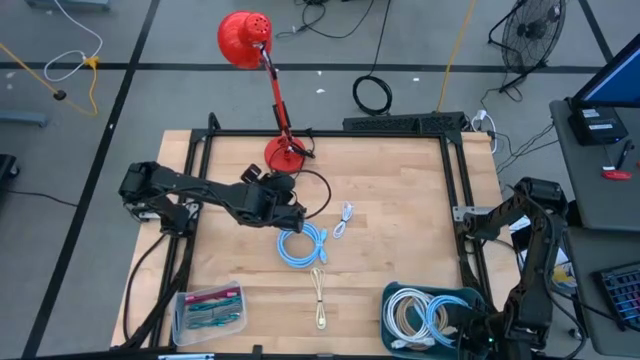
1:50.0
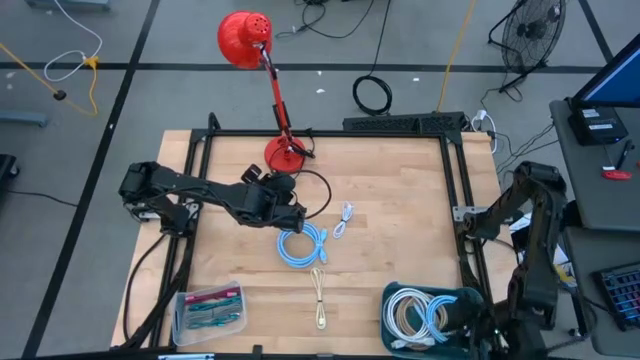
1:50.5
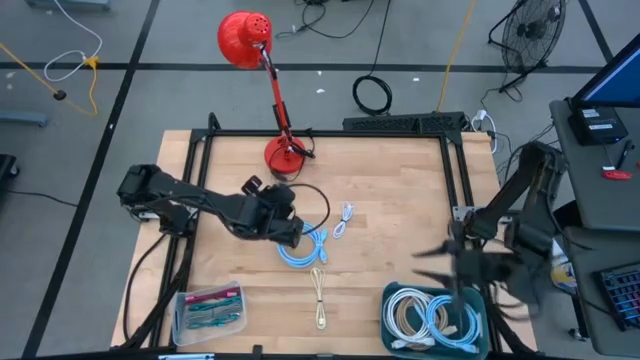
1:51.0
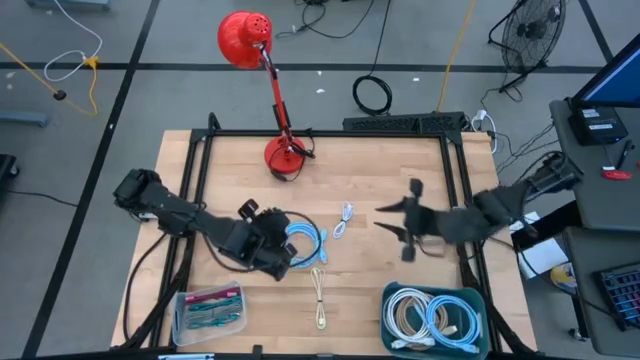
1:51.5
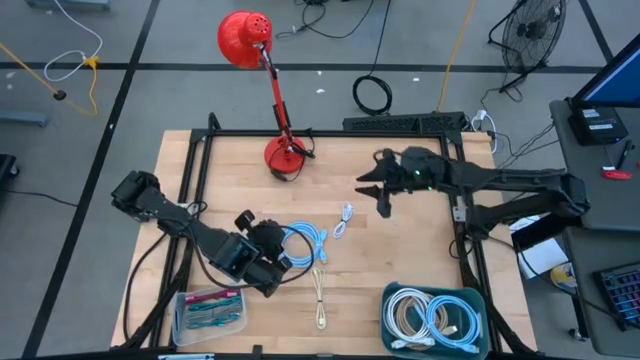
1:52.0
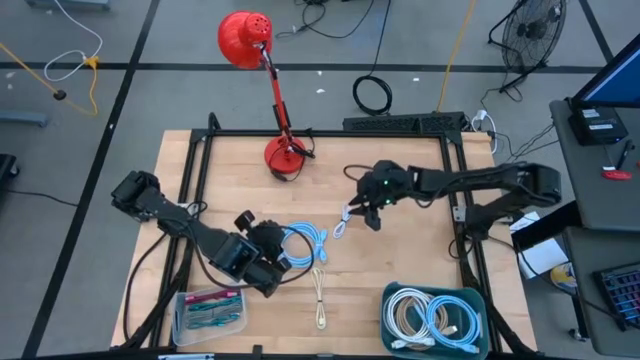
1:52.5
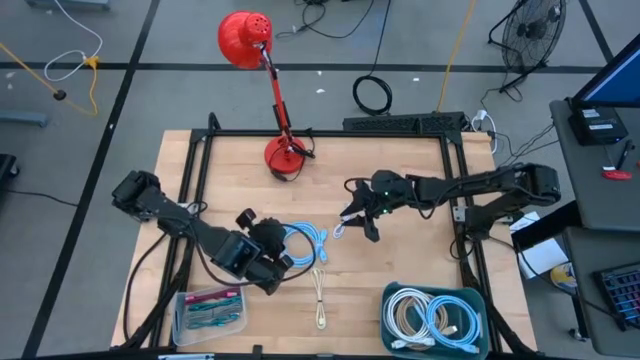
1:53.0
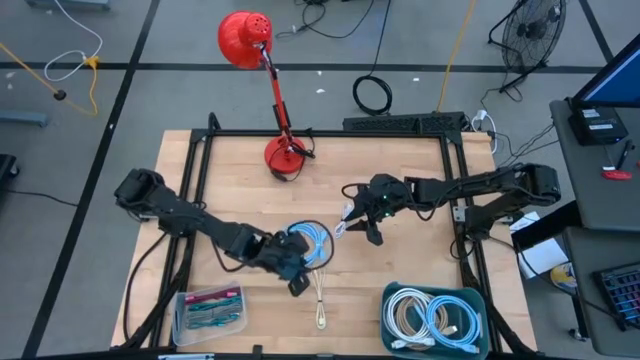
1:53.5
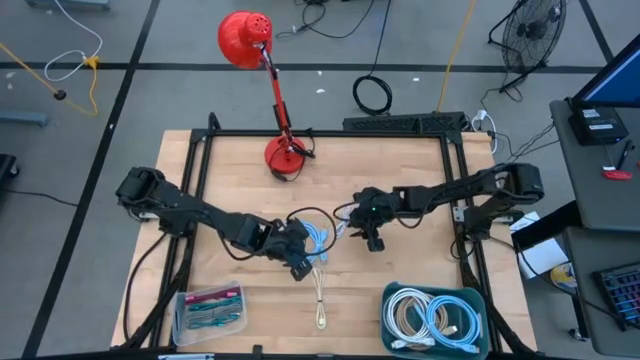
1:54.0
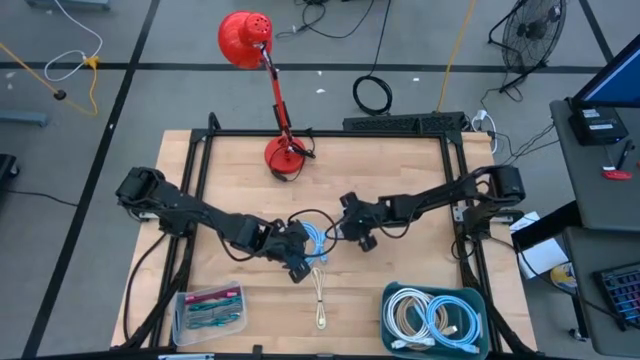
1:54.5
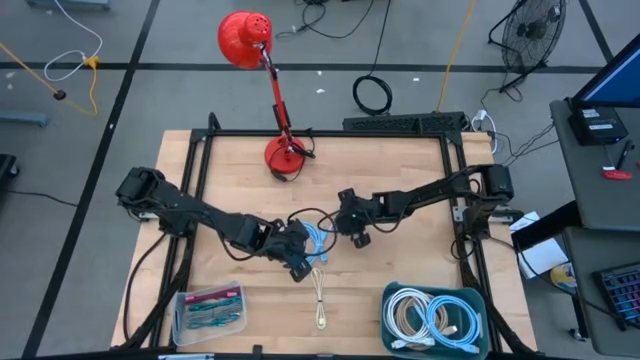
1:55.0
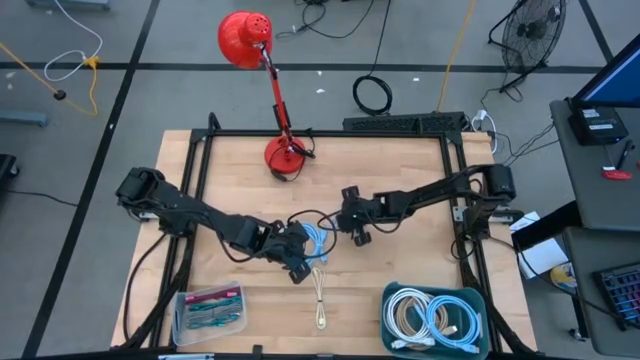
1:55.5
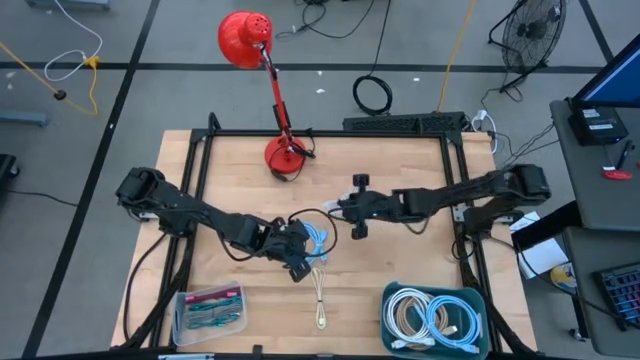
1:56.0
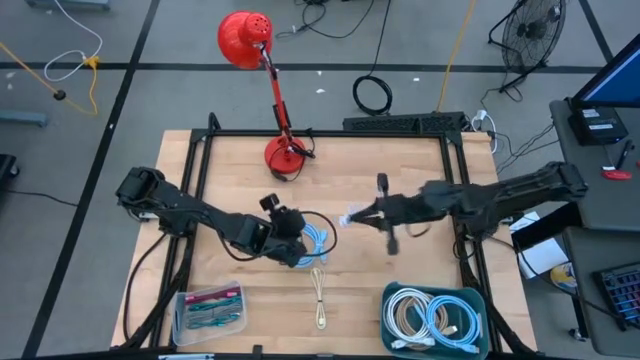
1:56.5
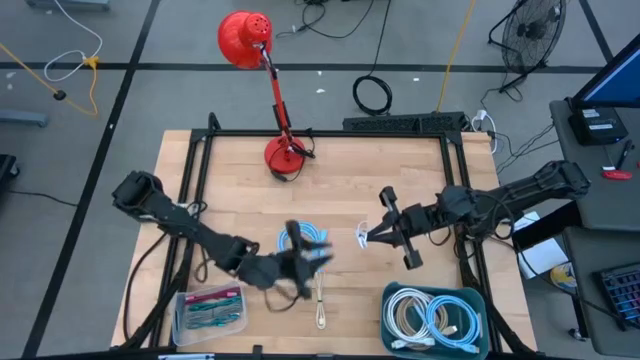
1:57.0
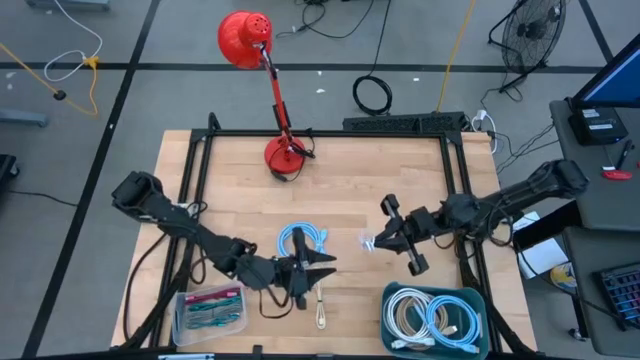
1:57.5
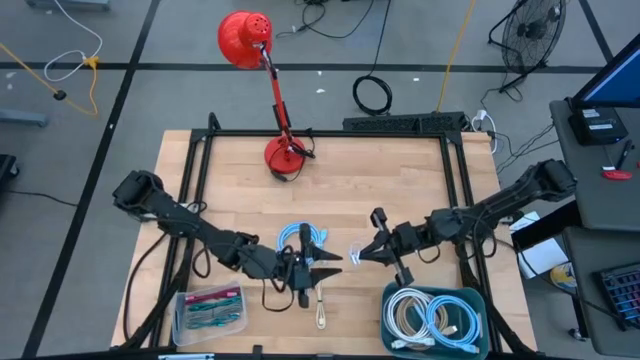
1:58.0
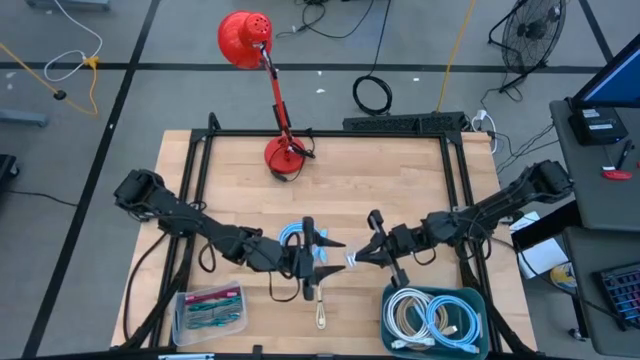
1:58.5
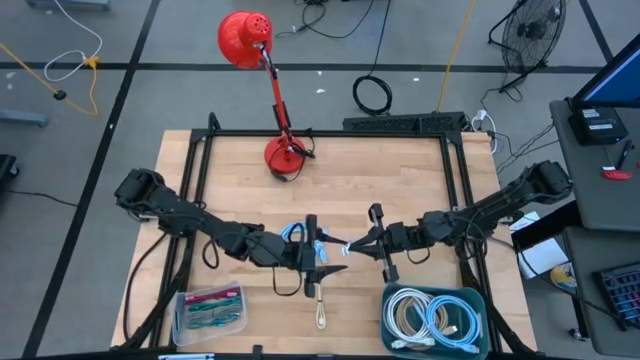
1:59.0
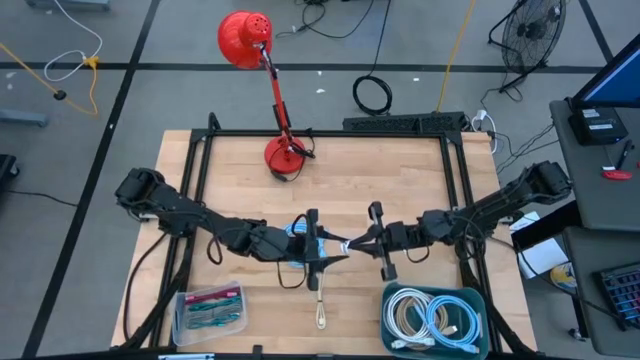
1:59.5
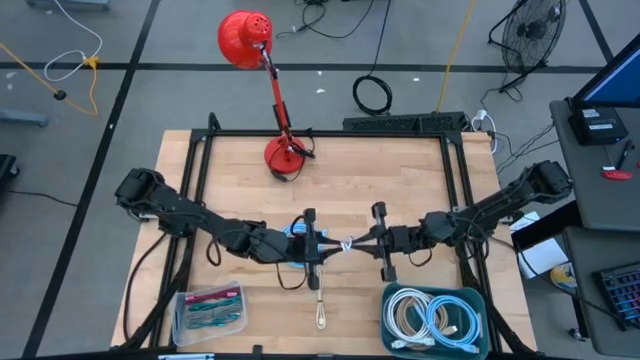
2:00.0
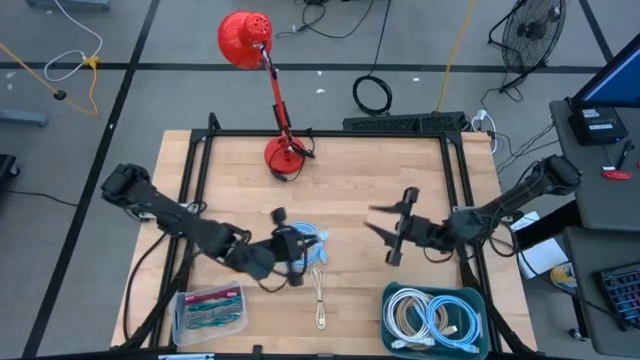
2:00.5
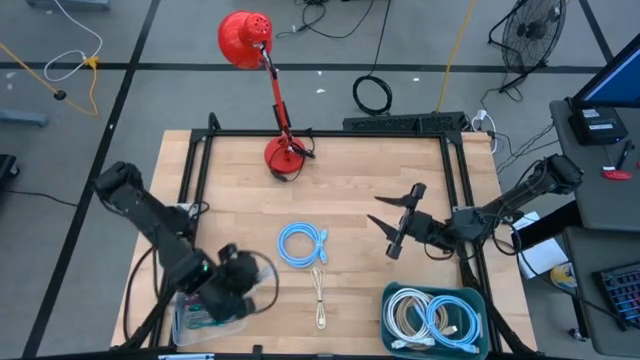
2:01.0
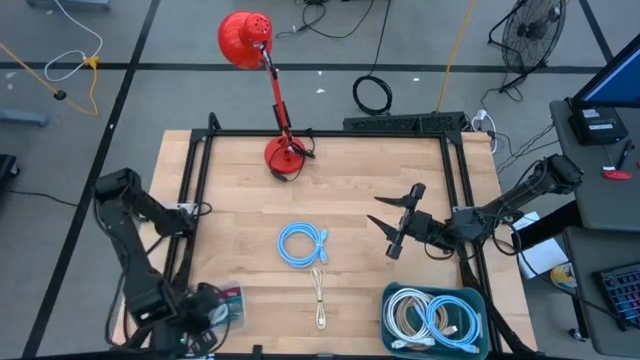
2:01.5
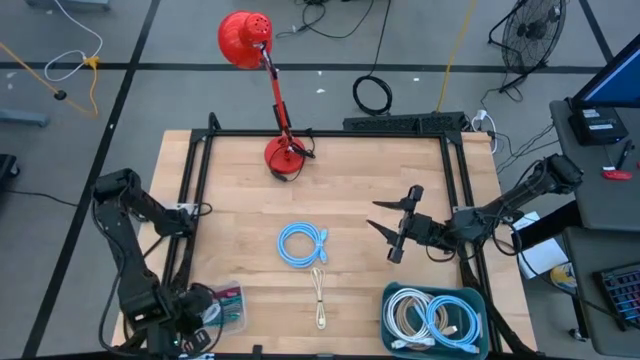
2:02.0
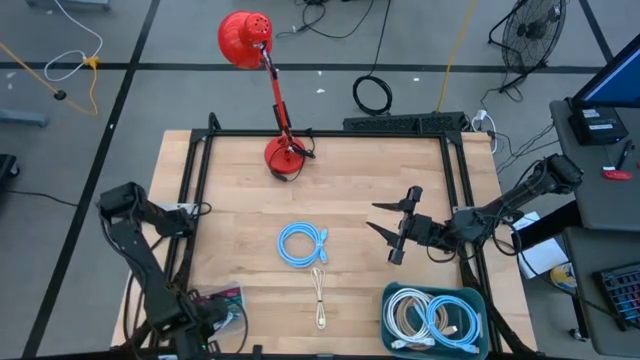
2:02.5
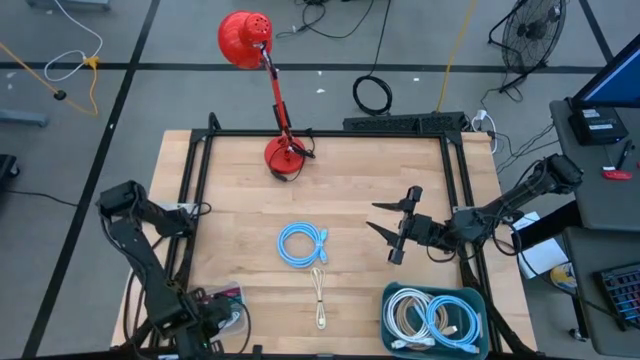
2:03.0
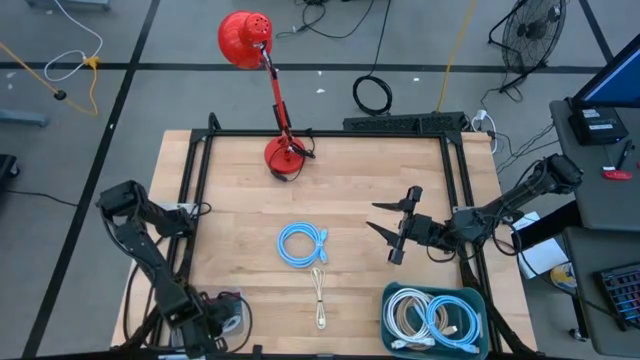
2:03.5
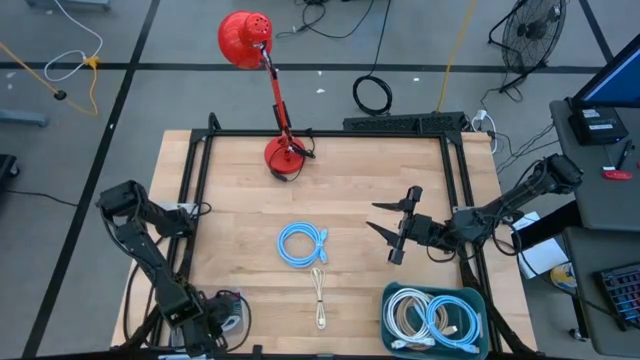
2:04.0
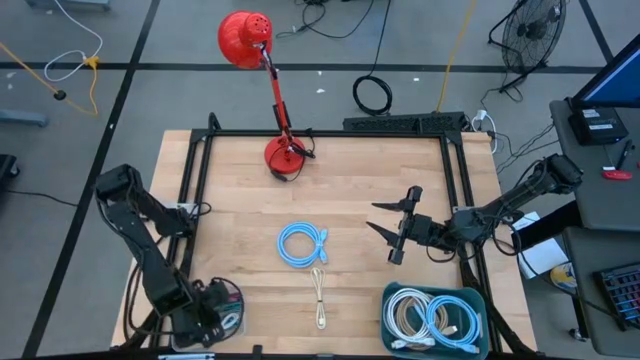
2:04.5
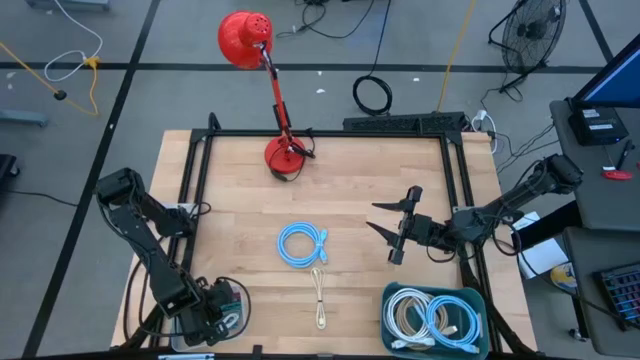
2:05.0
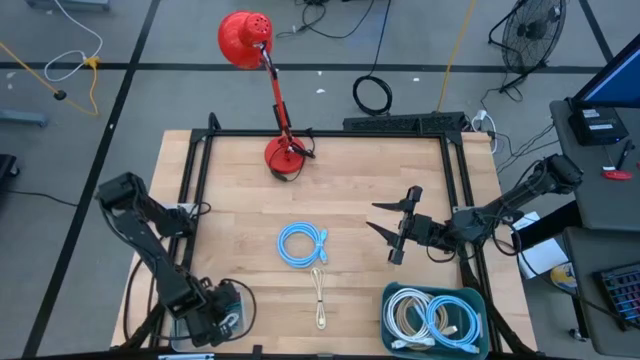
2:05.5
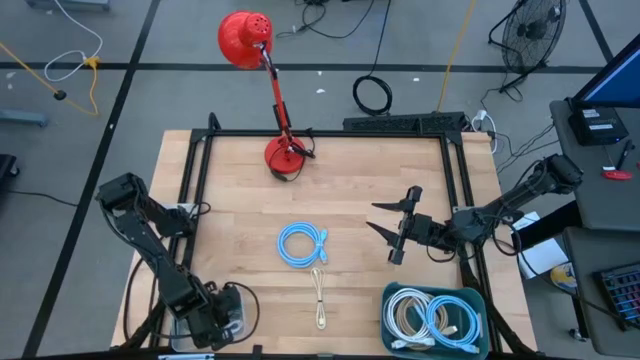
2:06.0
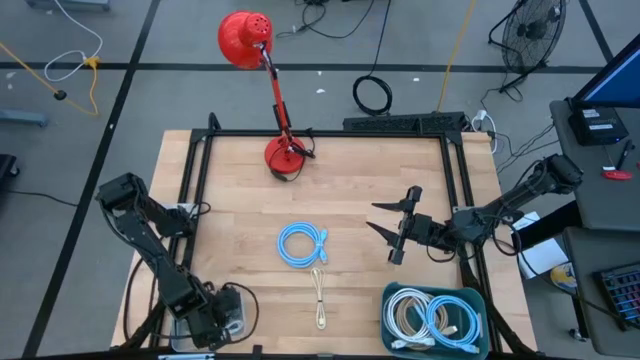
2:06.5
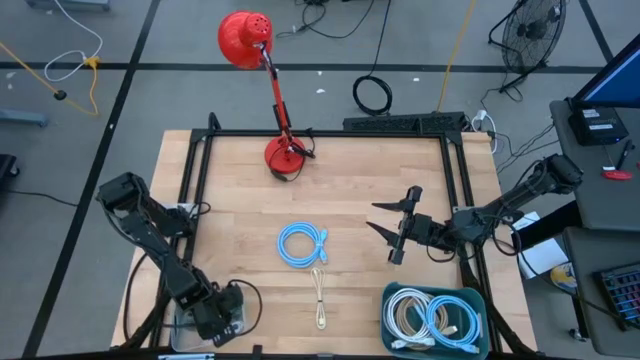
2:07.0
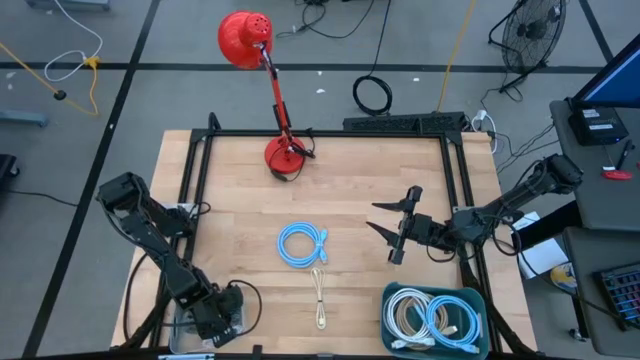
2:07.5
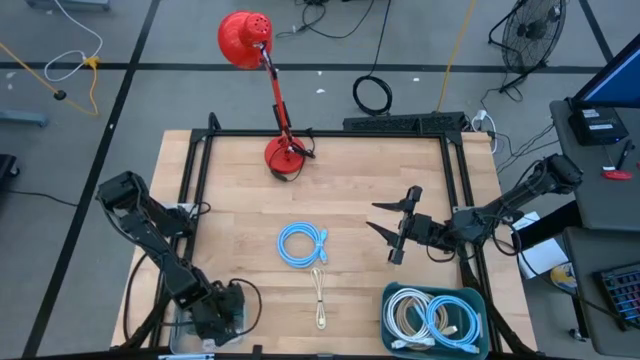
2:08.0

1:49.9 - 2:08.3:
Task: Pick & Place USB Port
Put the white charger cable into the transparent bin
